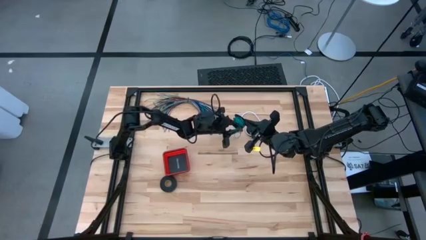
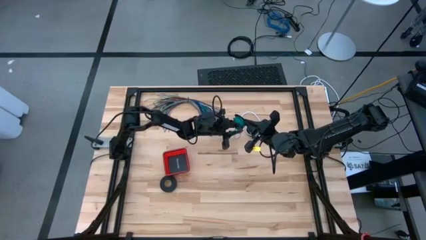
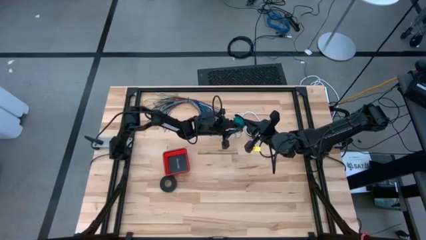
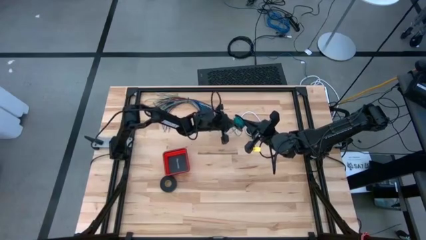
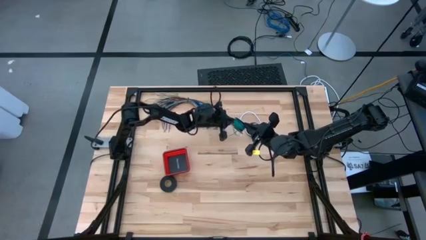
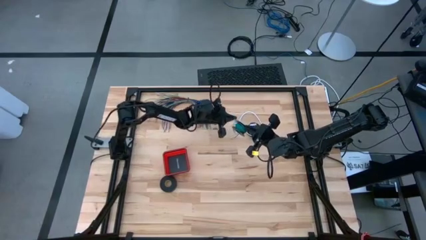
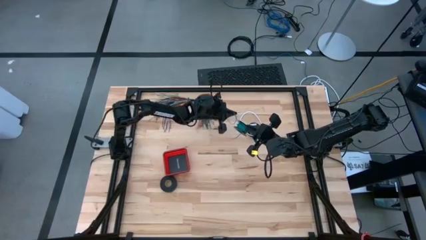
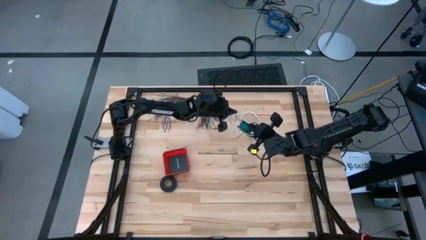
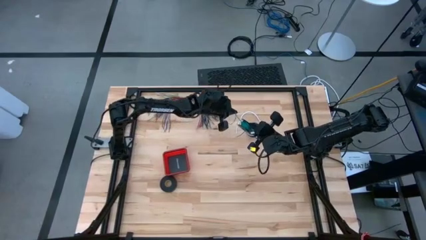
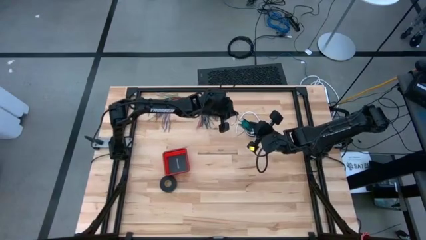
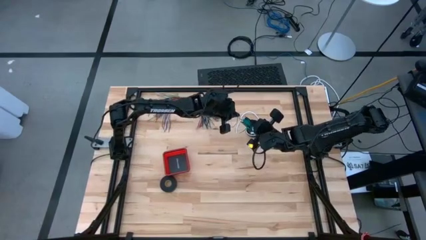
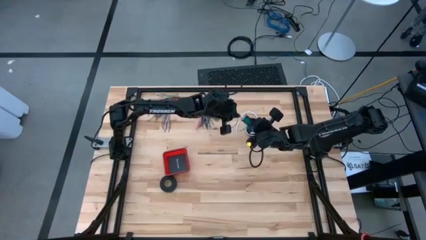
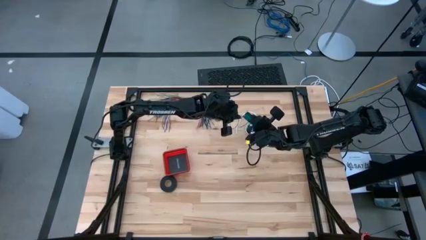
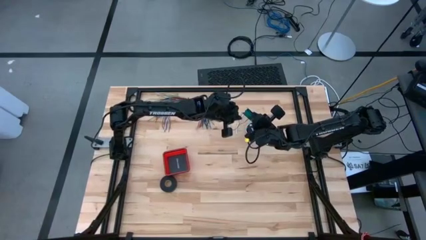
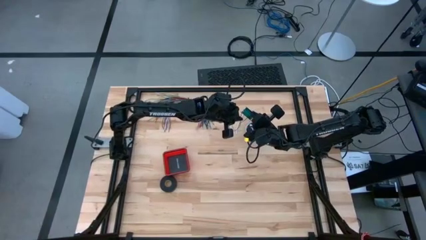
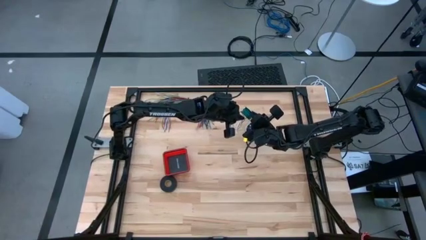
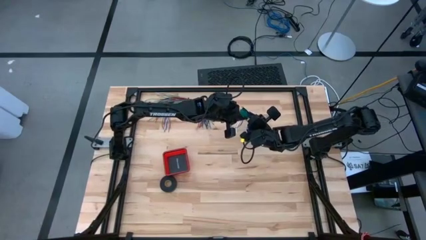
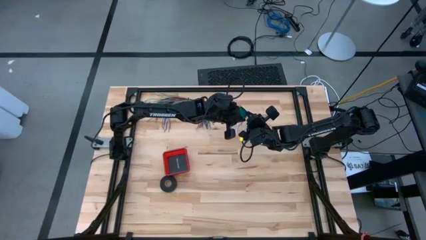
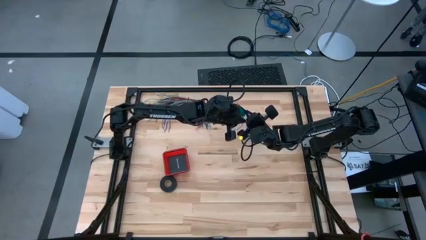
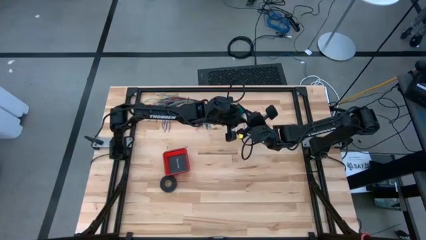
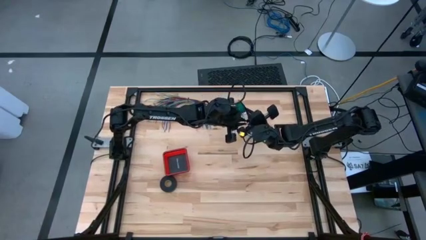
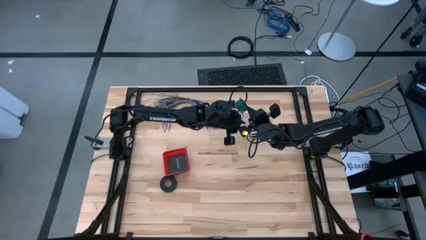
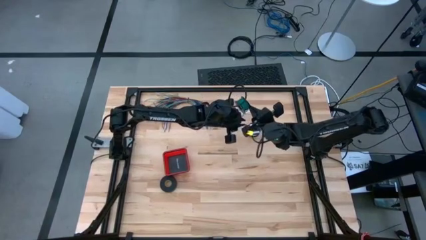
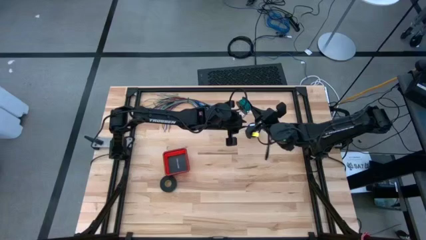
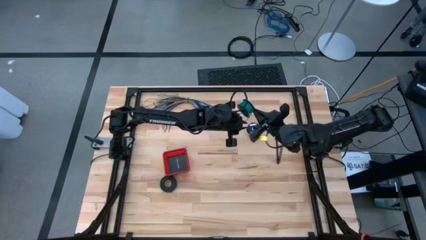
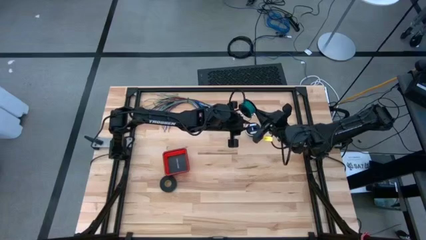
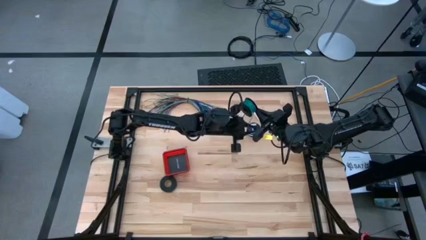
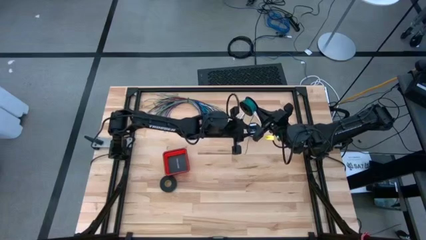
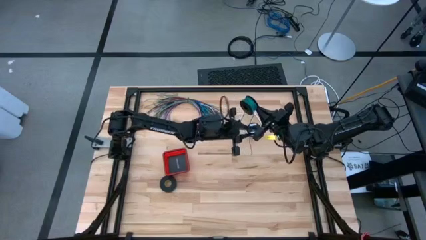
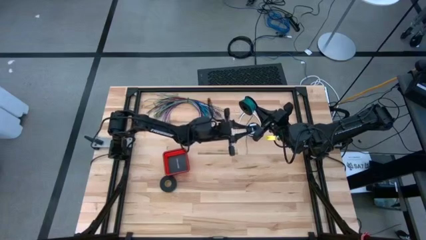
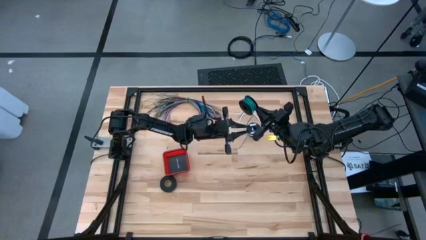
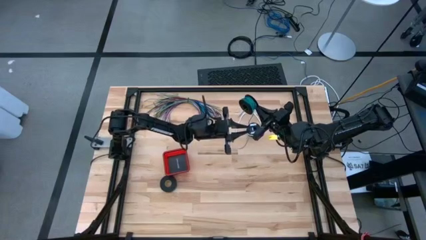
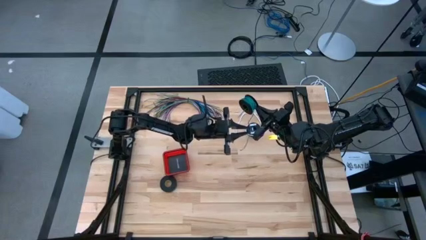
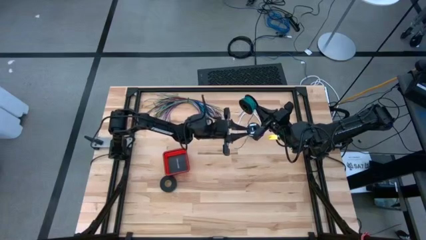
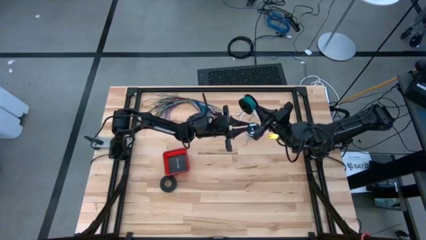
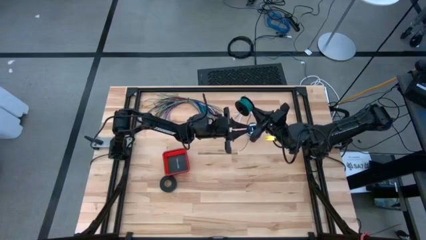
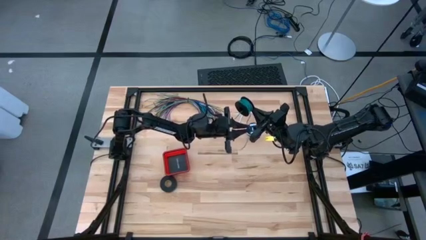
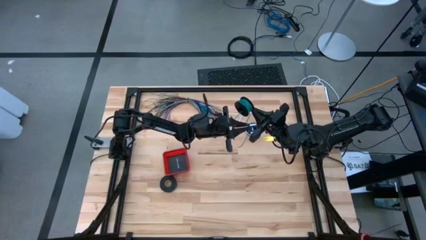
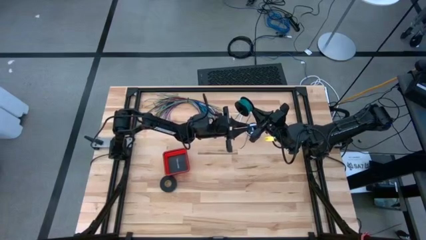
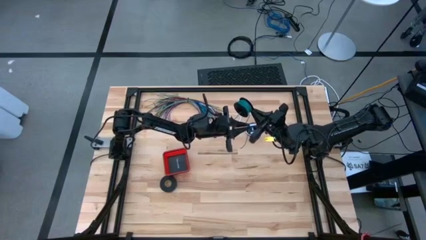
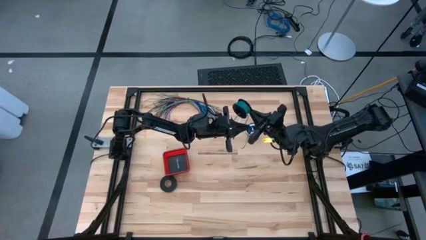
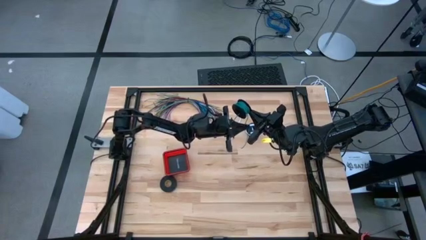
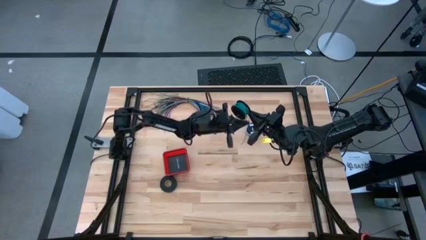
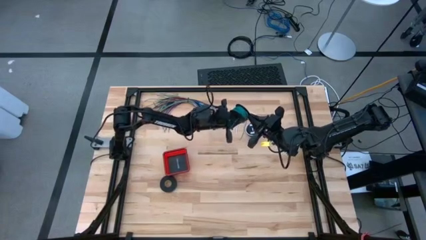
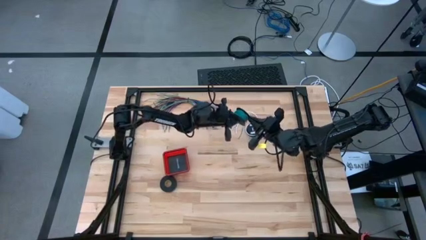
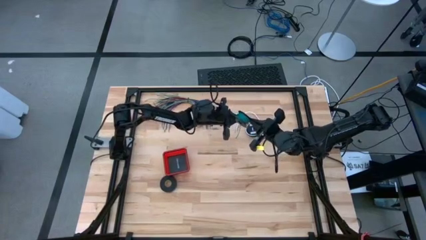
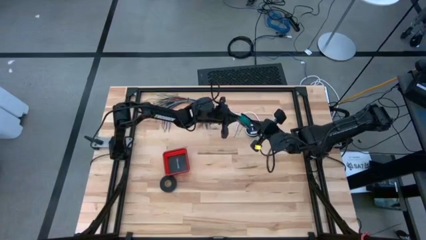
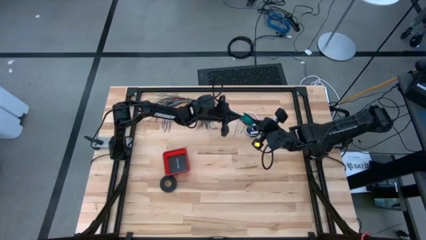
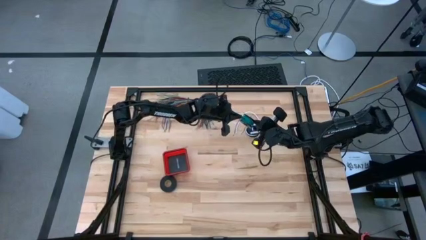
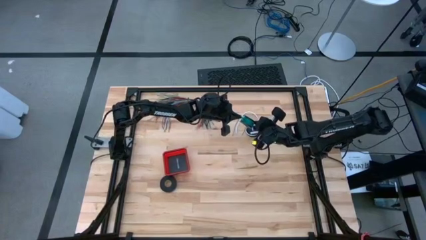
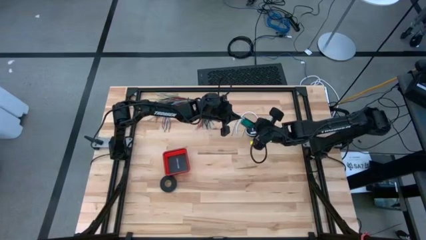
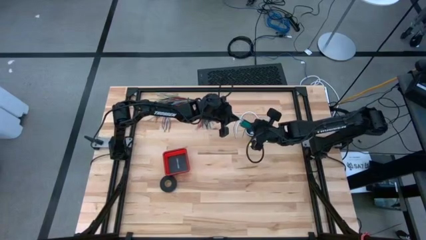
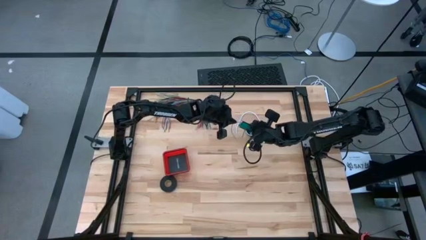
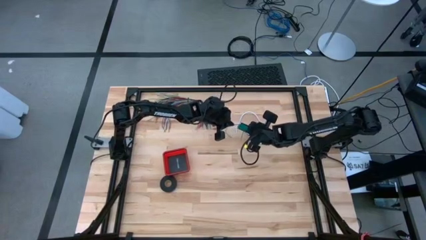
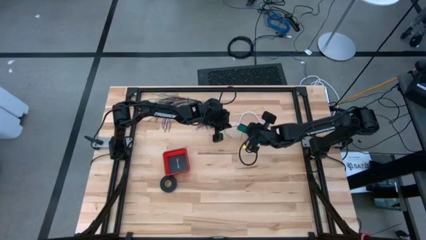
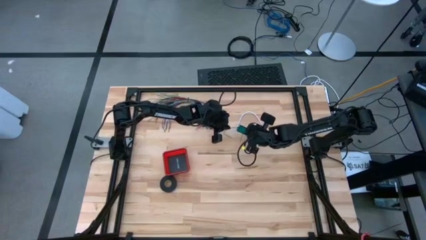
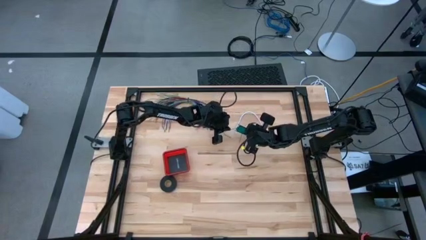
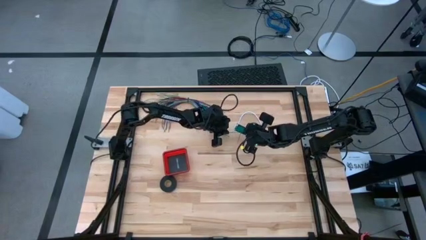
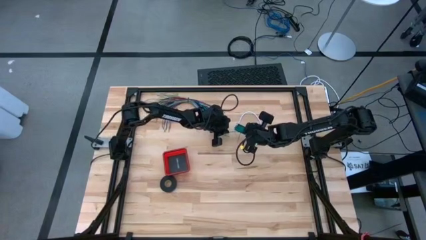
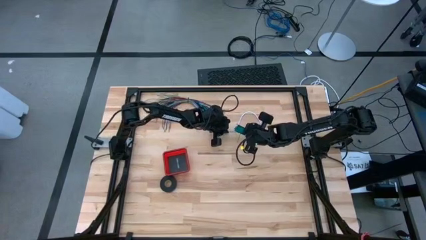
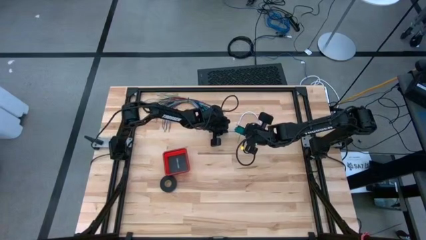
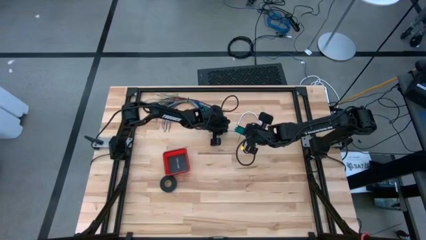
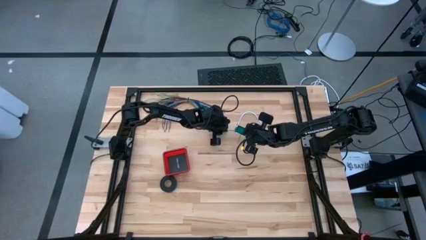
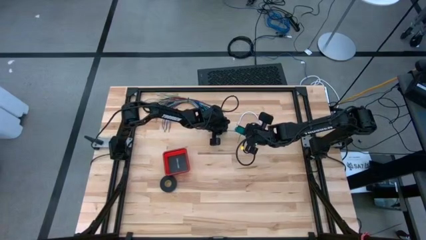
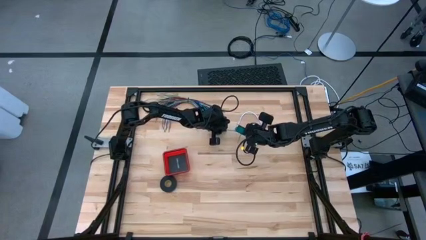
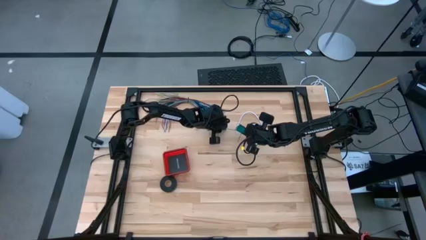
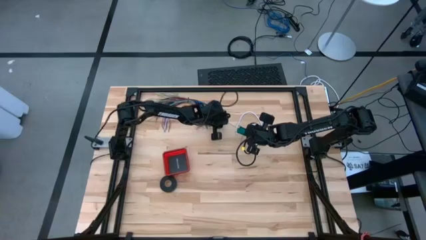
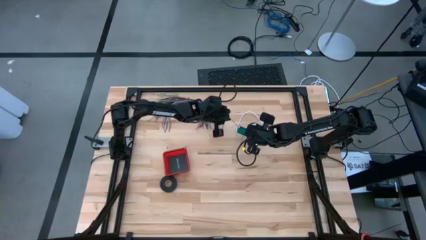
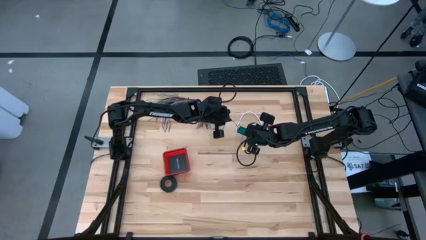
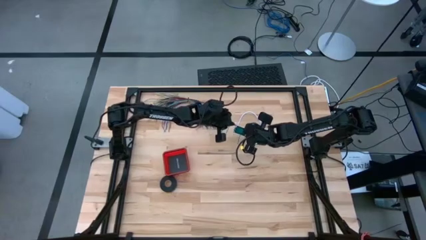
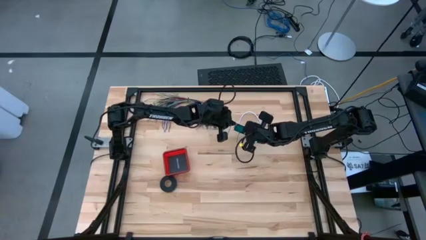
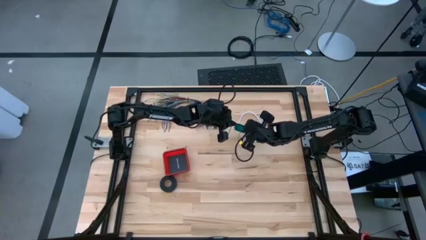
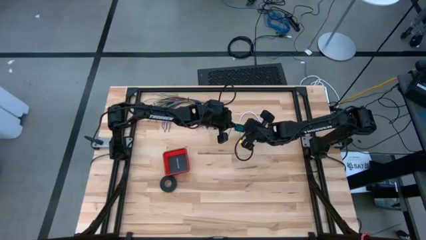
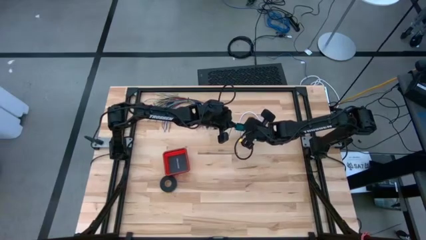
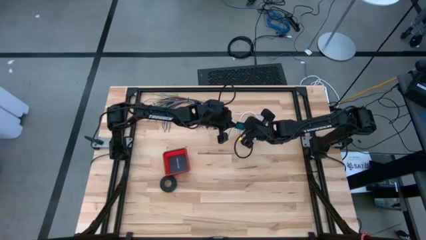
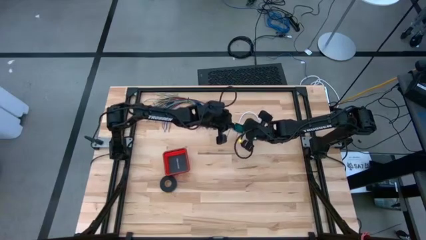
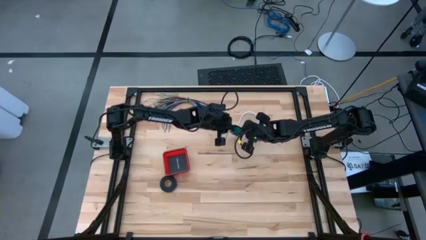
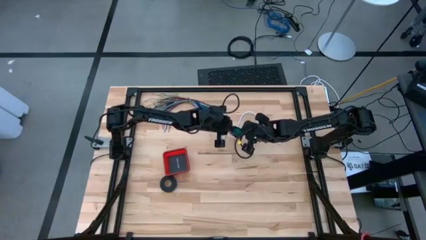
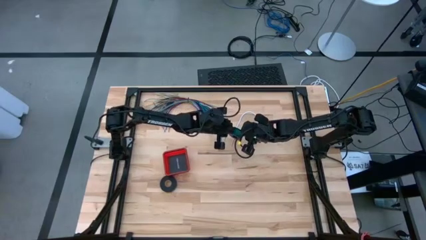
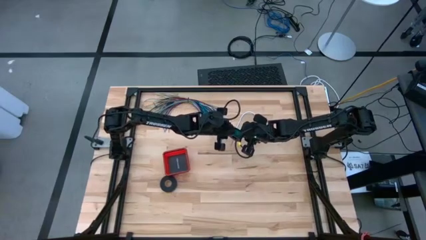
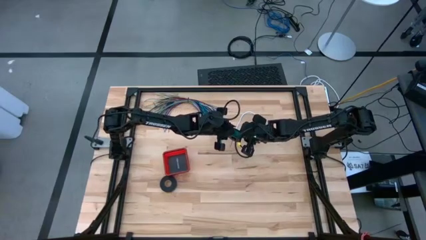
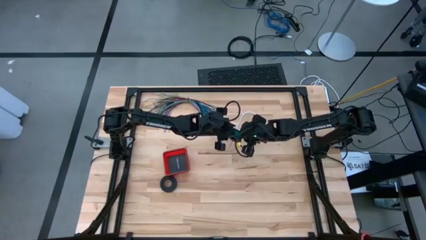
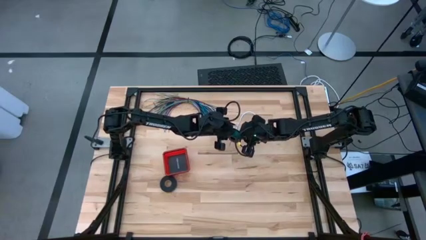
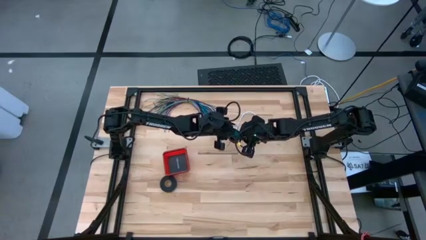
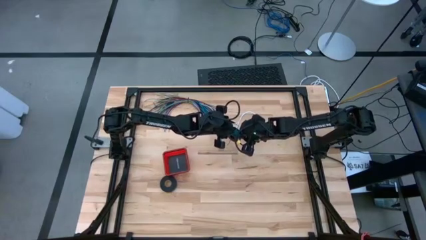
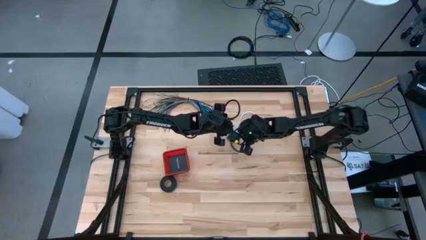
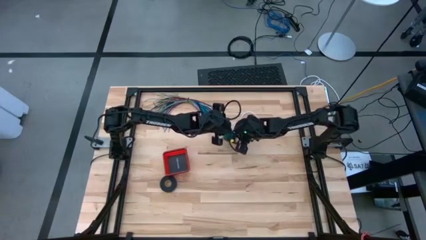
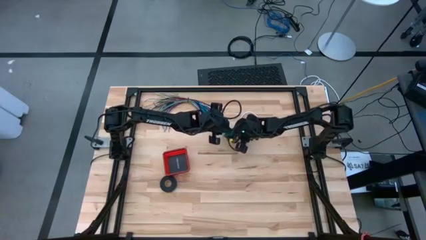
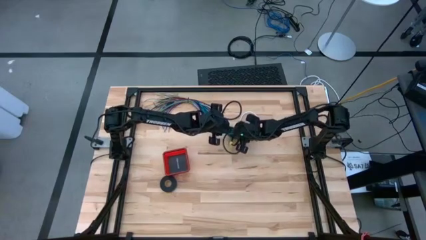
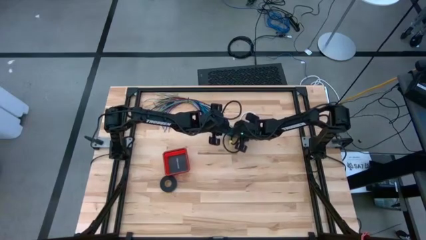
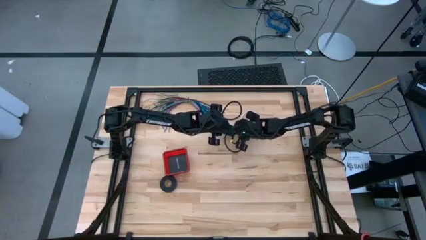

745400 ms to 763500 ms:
Task: Coil cords
Coil the green wire onto the spool
